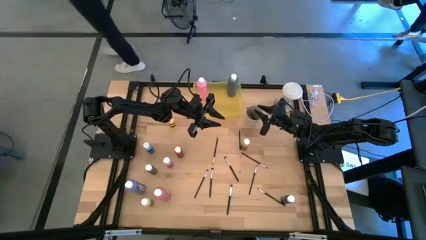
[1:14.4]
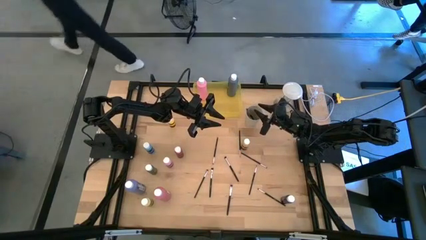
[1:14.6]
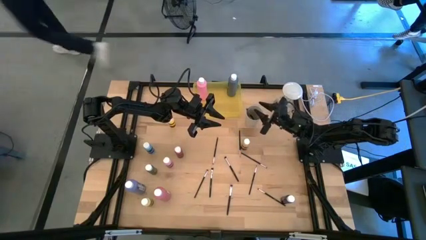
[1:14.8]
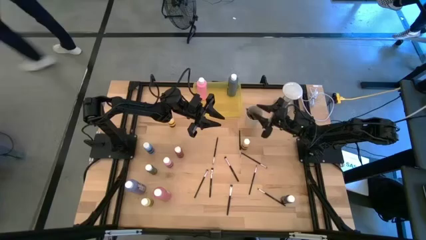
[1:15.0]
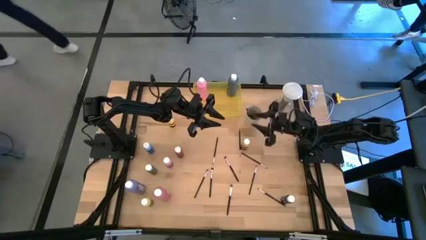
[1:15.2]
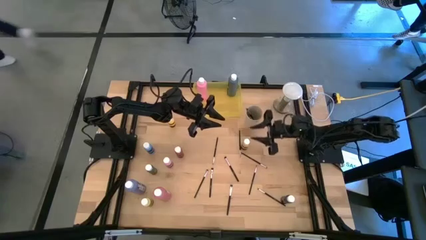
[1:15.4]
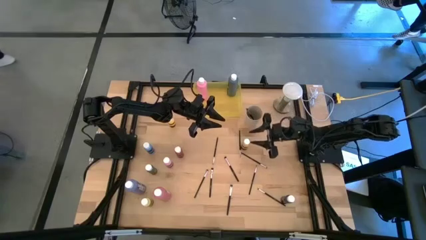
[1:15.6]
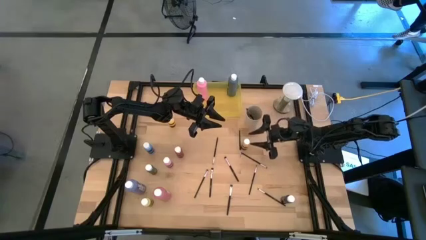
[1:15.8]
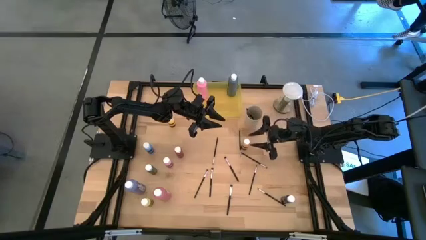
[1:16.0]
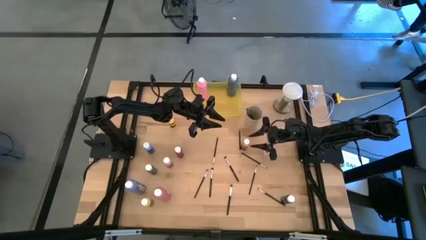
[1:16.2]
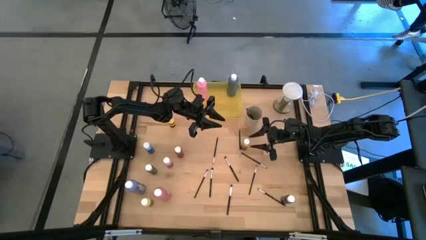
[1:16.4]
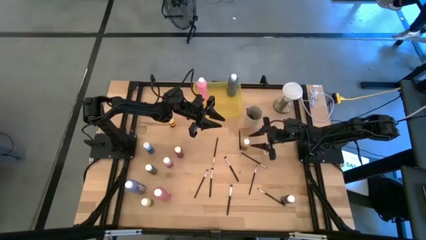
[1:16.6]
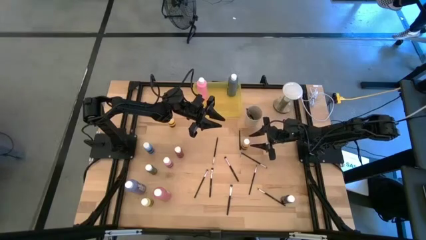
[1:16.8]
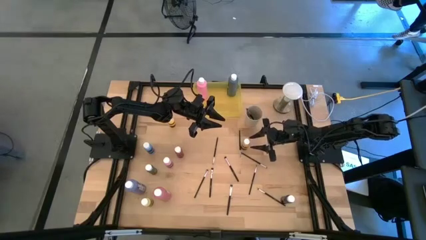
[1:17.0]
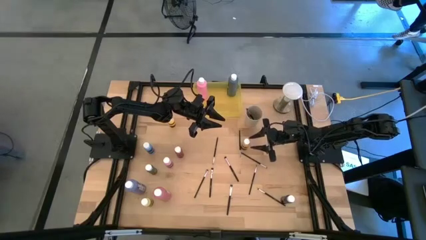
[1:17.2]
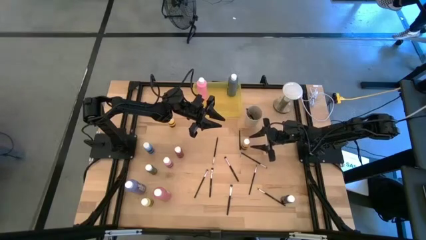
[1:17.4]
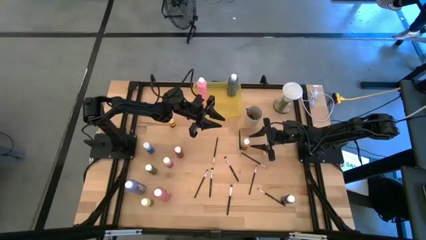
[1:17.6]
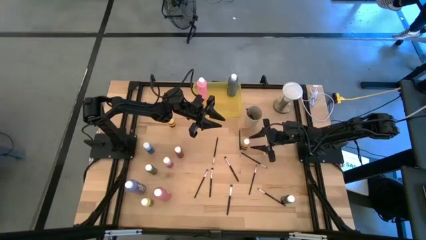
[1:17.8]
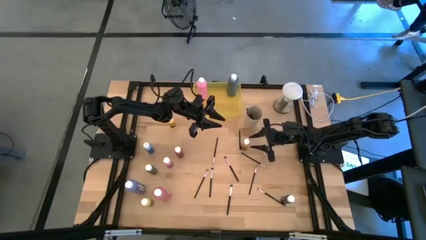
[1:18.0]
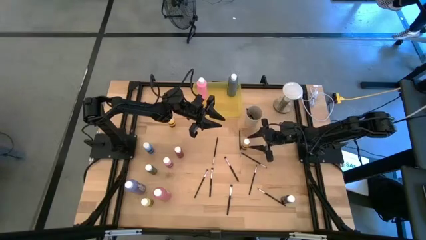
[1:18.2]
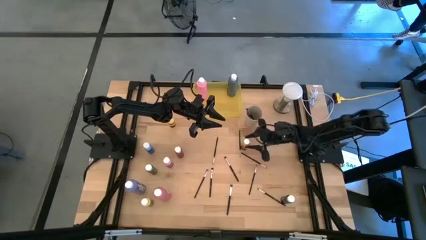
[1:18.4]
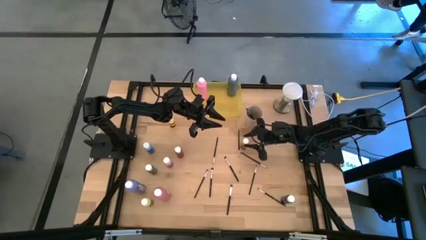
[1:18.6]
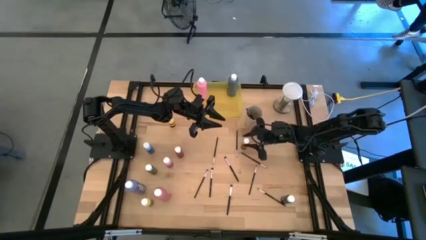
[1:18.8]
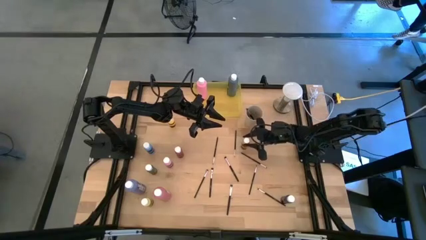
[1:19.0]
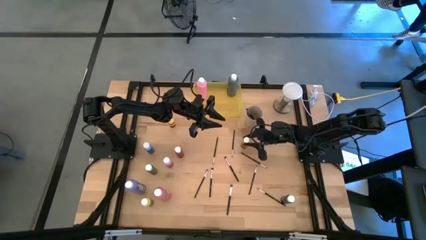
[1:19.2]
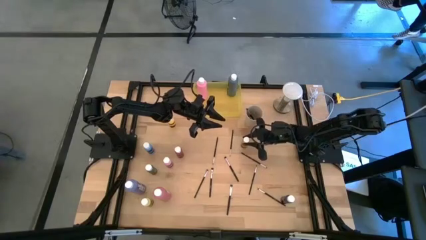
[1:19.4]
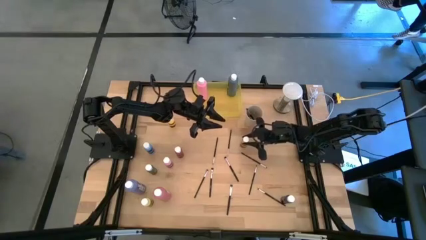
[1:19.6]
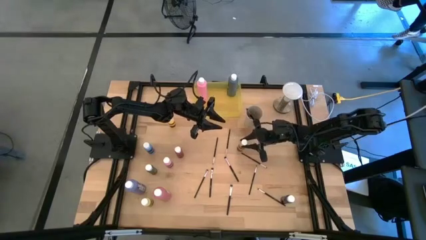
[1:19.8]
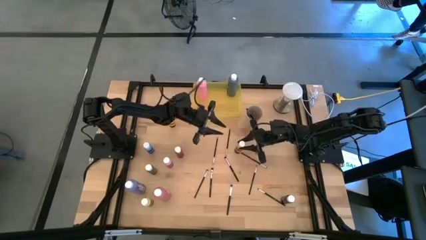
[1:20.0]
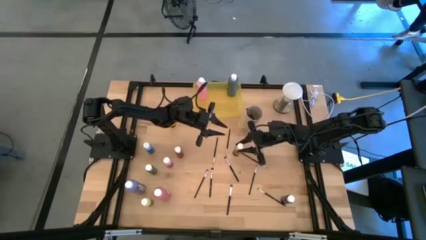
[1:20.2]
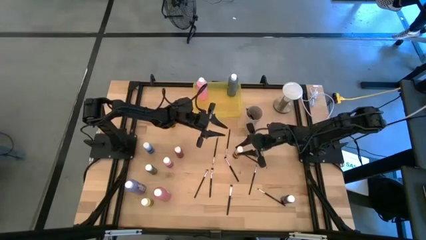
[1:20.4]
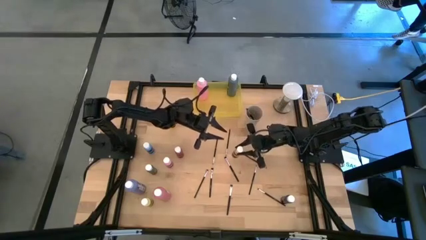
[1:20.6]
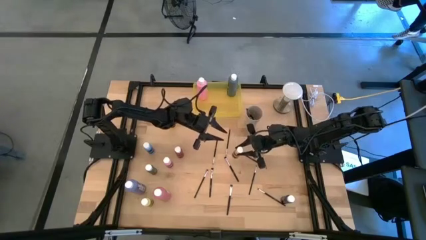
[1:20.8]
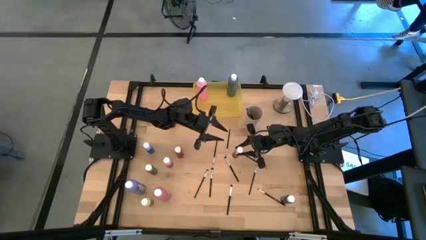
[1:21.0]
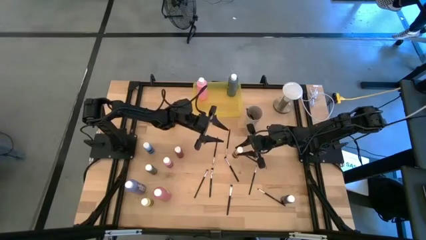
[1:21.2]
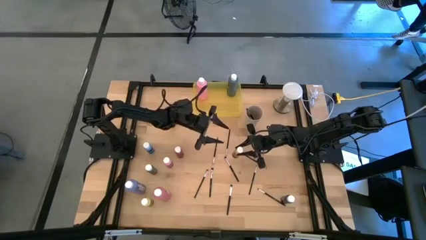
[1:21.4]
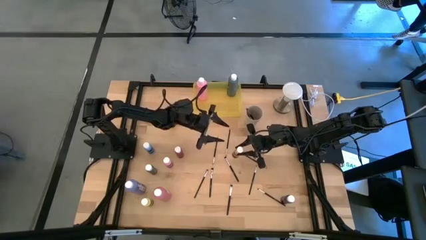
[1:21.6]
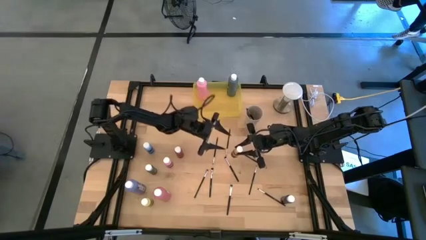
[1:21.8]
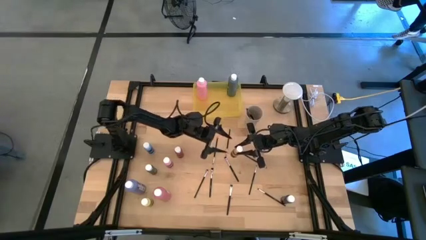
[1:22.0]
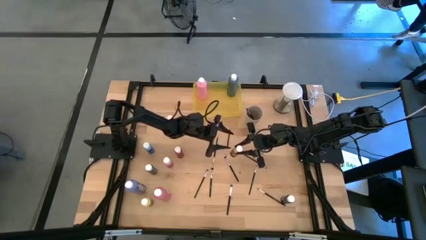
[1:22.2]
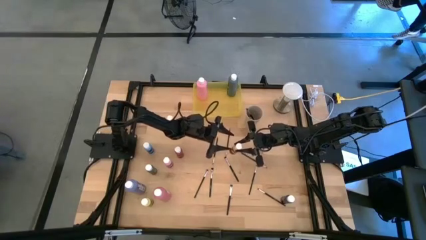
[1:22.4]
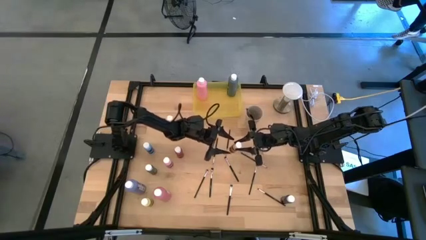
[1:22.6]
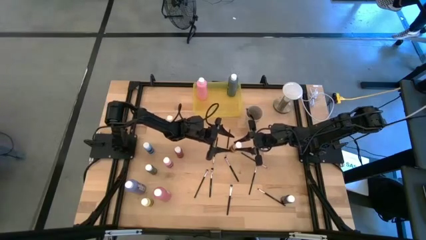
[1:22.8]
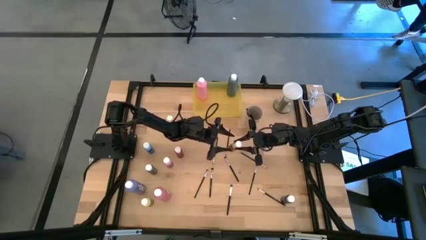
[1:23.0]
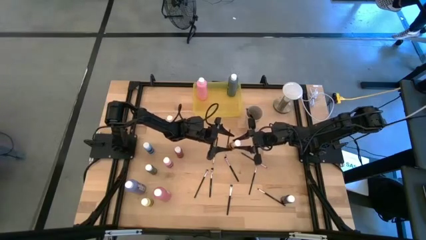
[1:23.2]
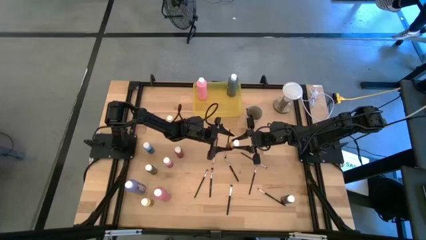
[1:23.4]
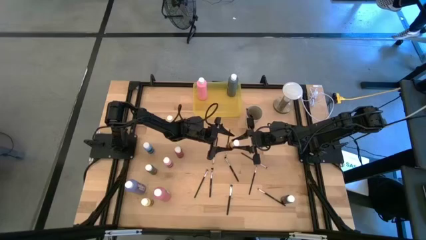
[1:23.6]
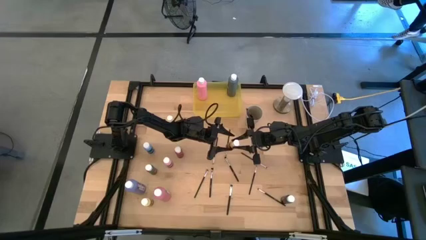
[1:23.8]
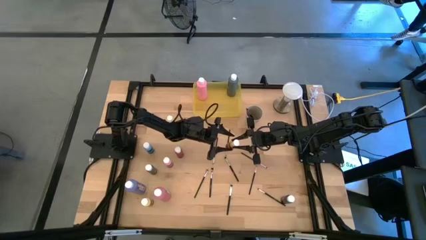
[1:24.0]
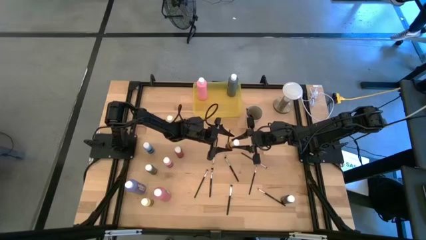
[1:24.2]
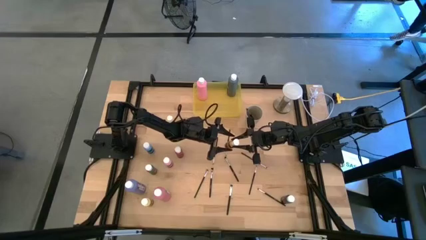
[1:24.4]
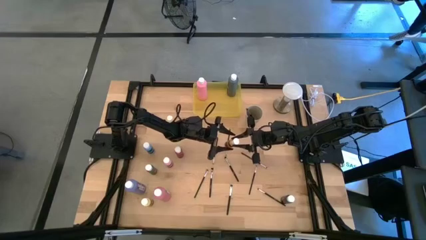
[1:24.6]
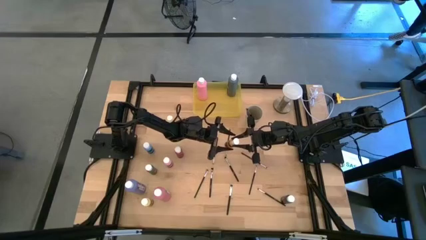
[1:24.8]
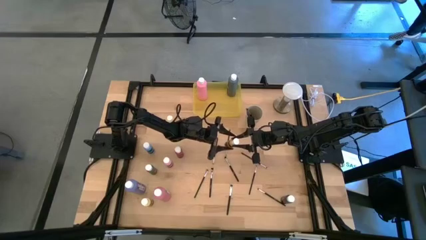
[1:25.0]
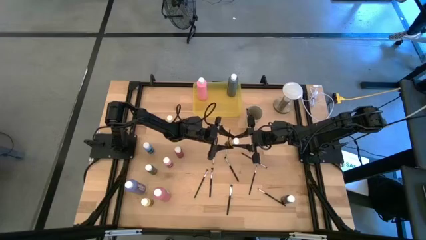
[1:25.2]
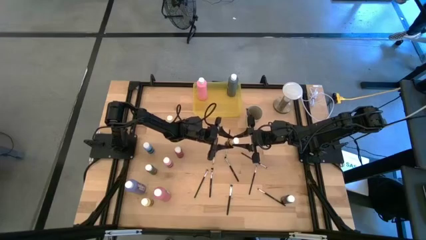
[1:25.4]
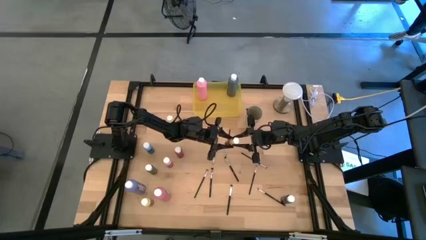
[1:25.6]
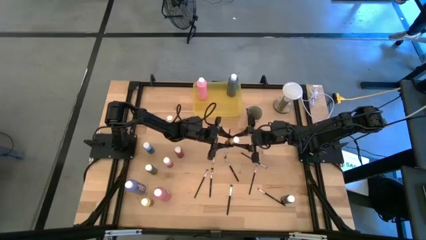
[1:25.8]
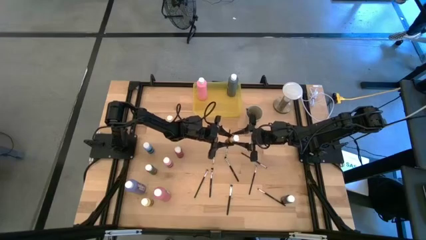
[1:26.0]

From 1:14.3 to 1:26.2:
Task: Pick & Place Paint Supplies
Put the small yellow paint bottle into the yellow bin
